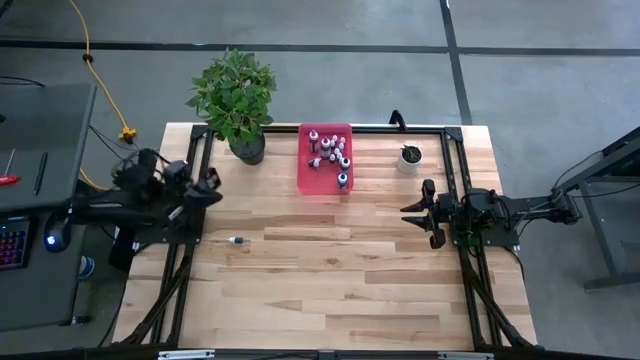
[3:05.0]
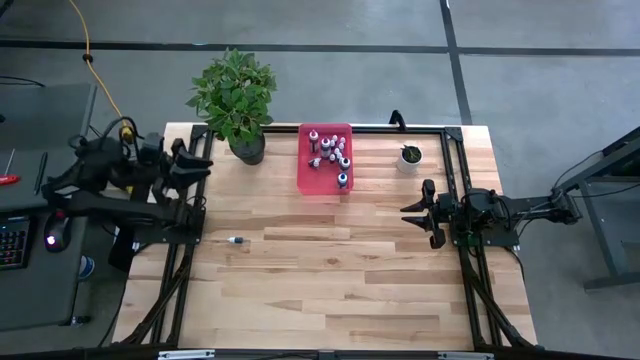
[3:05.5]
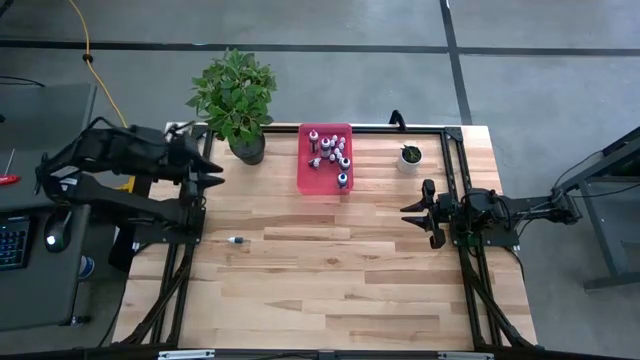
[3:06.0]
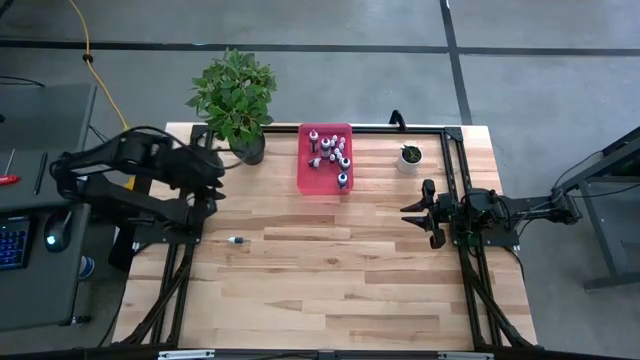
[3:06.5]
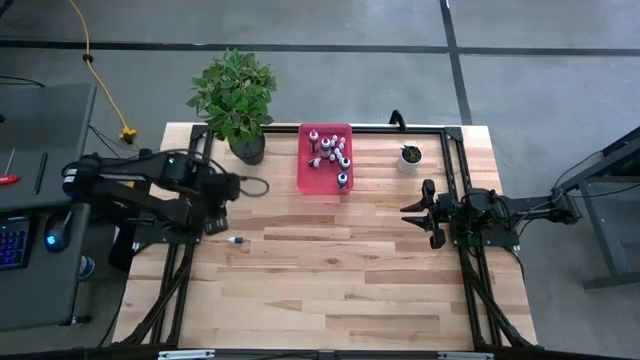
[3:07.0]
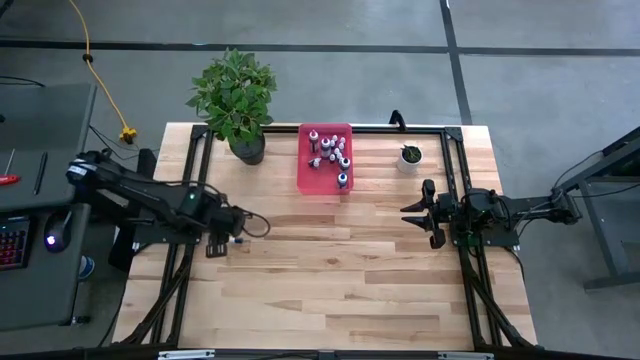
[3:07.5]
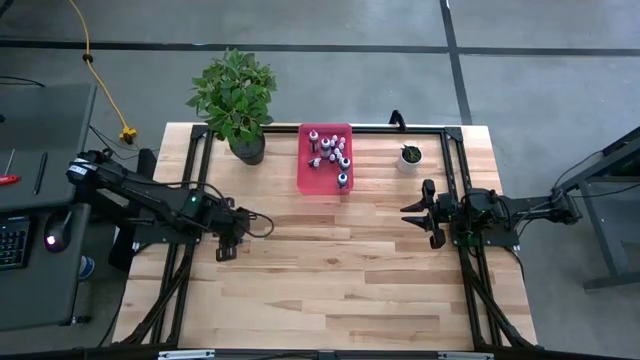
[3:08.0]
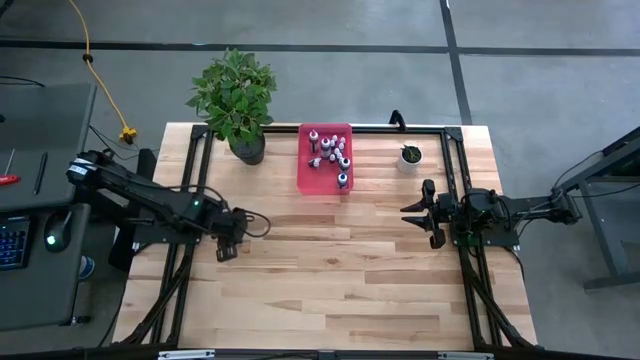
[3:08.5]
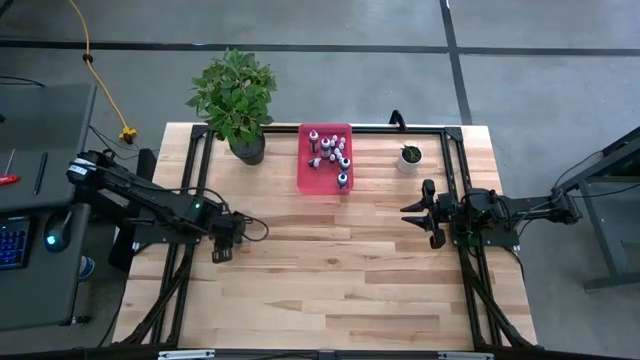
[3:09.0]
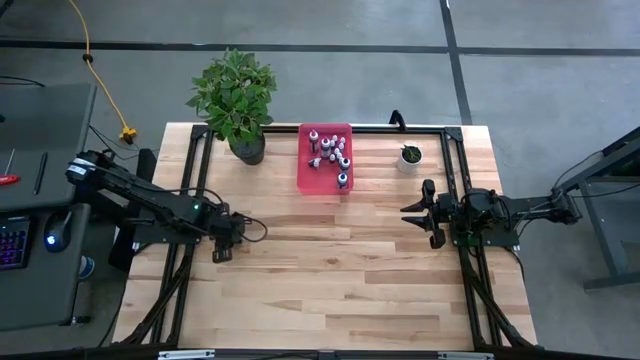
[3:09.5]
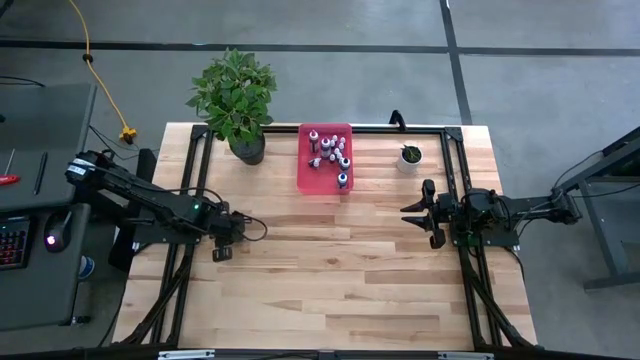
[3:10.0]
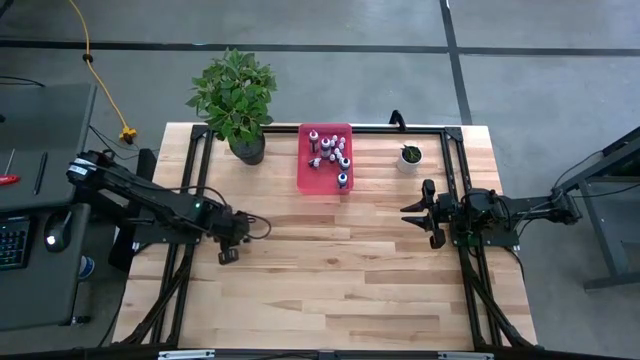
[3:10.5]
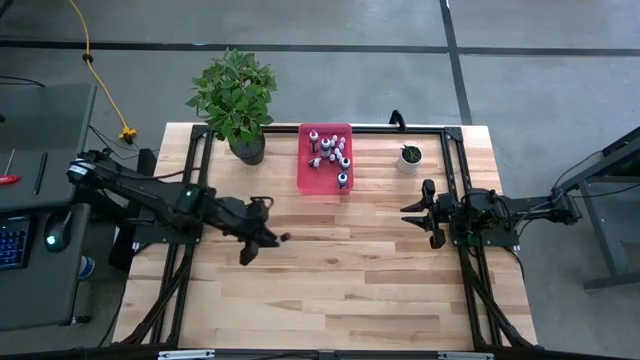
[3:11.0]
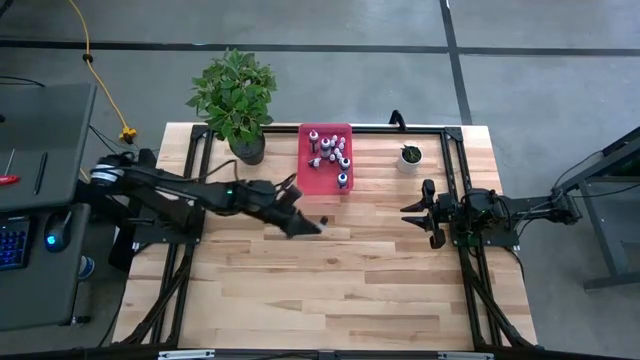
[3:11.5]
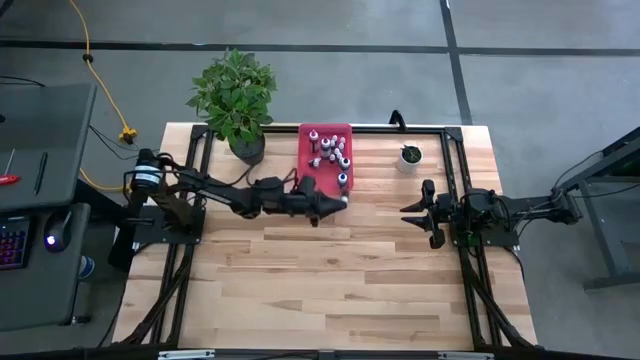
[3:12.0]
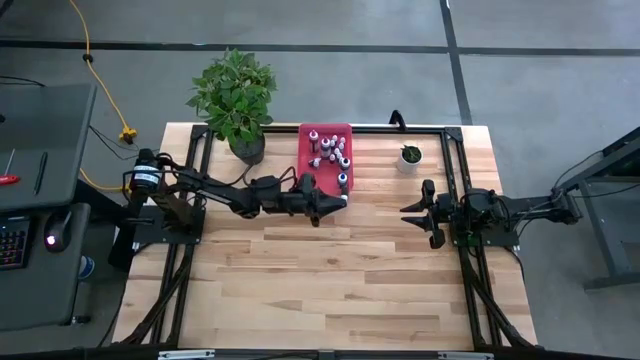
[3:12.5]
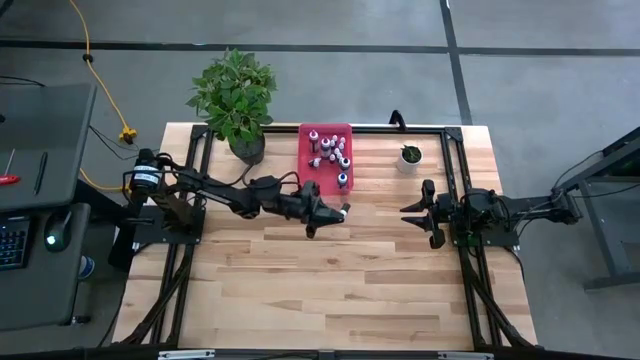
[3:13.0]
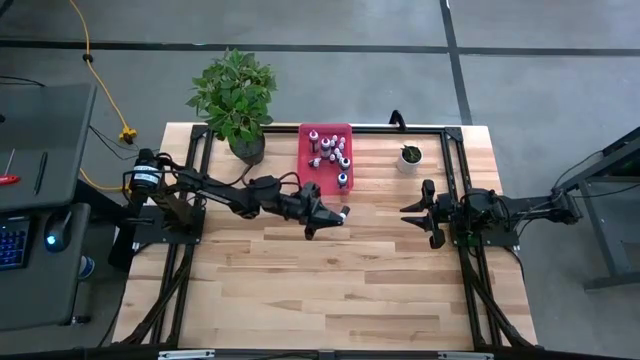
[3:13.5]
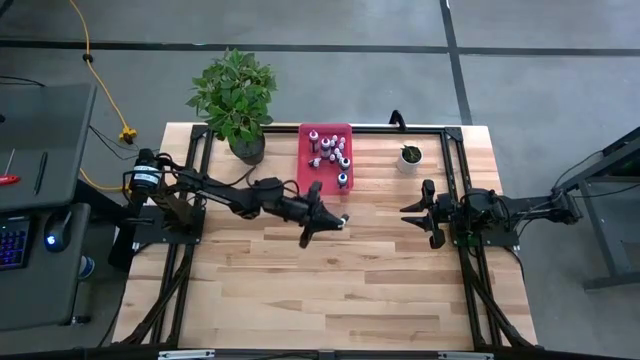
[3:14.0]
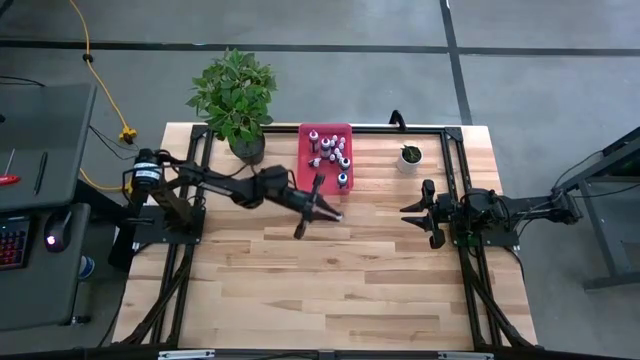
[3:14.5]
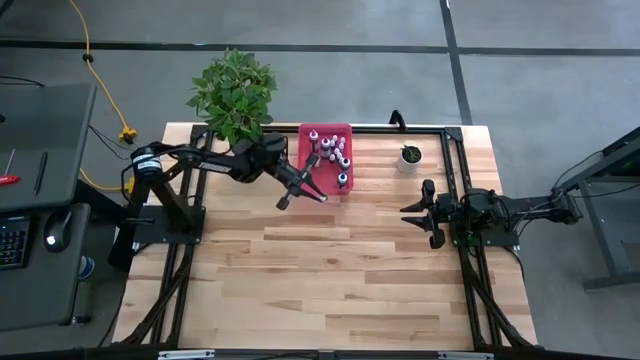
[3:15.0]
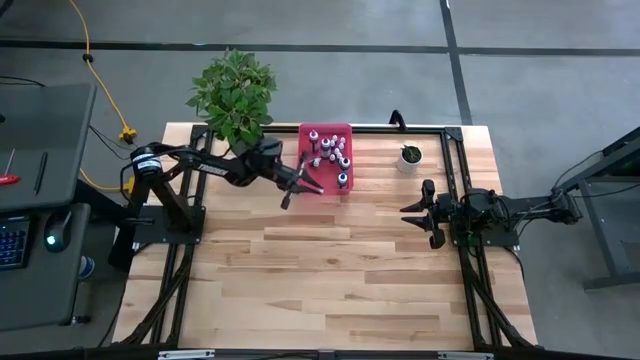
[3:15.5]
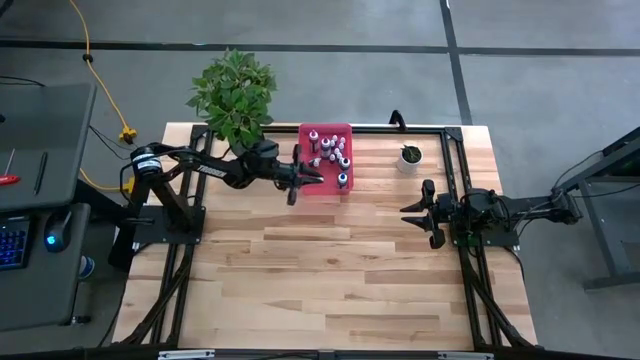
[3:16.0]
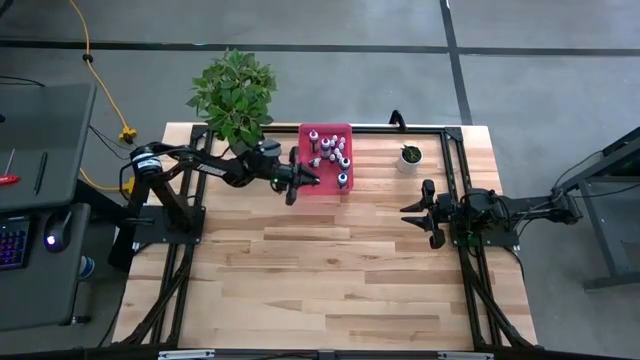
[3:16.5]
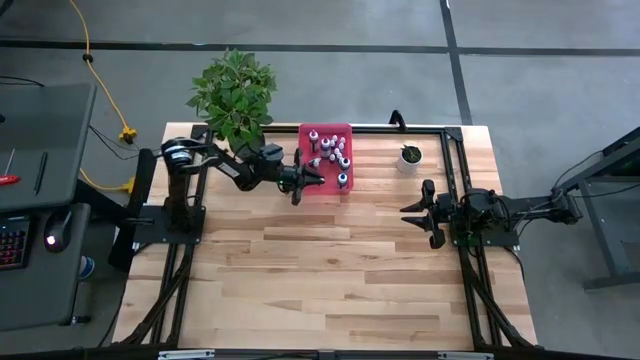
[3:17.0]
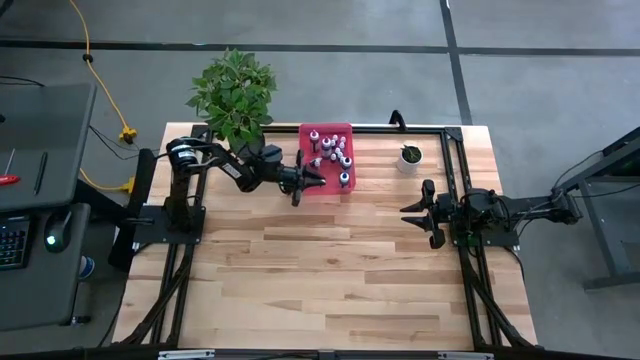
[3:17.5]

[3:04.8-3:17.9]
Task: Pick & Place food coloring
Put the black food coloring bottle into the pink bin

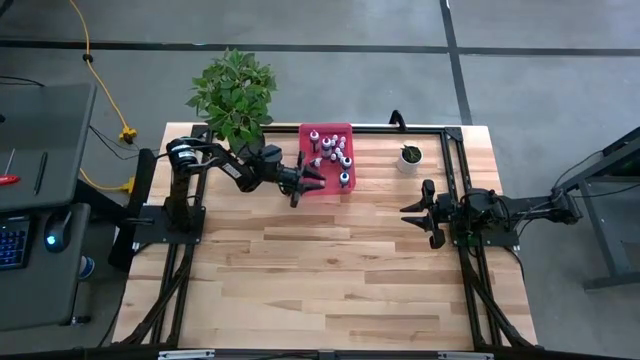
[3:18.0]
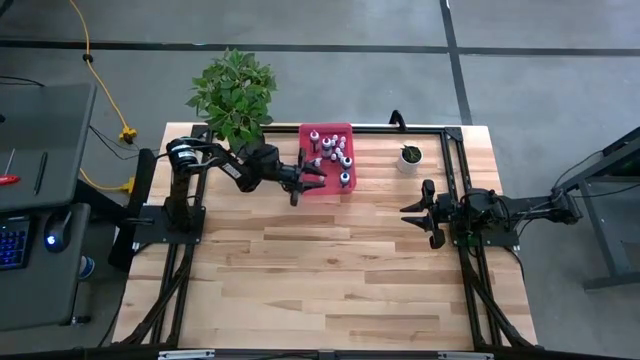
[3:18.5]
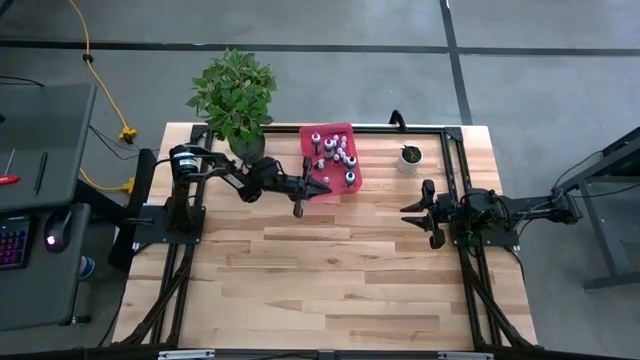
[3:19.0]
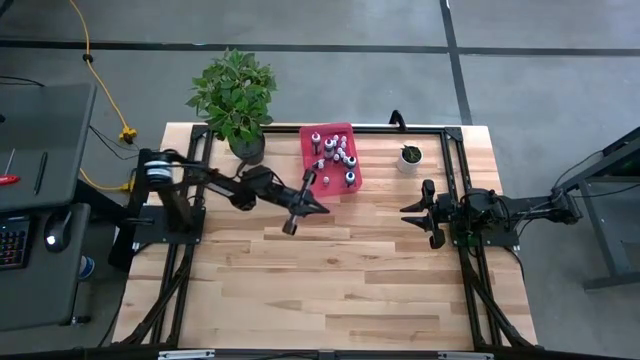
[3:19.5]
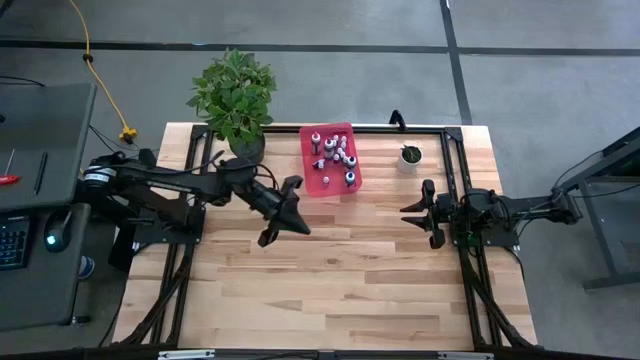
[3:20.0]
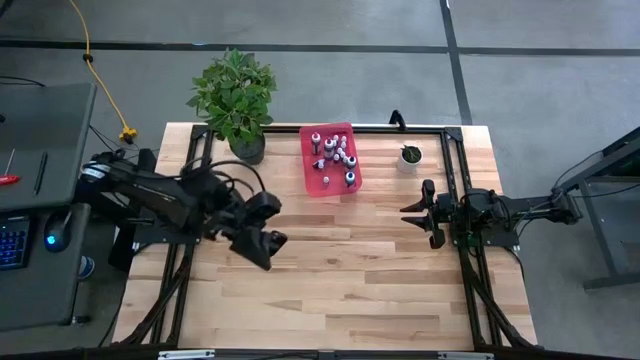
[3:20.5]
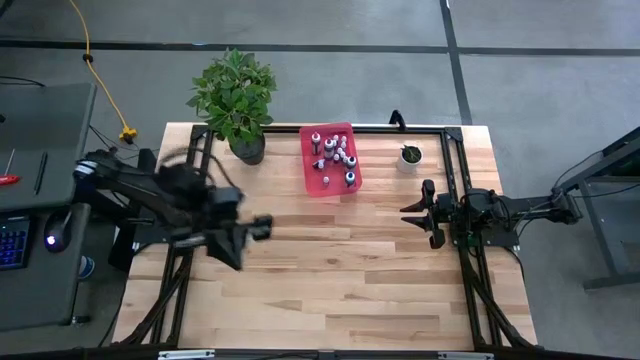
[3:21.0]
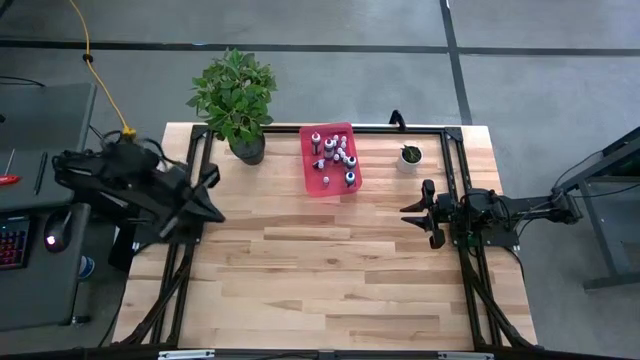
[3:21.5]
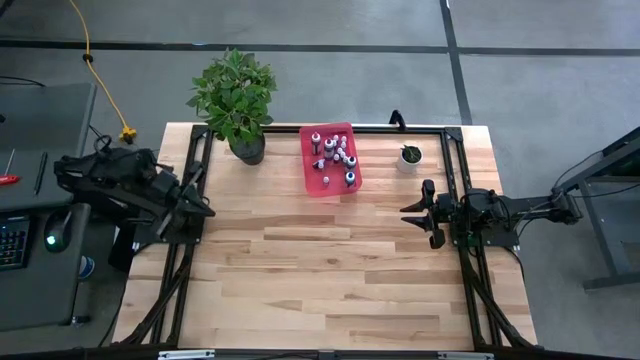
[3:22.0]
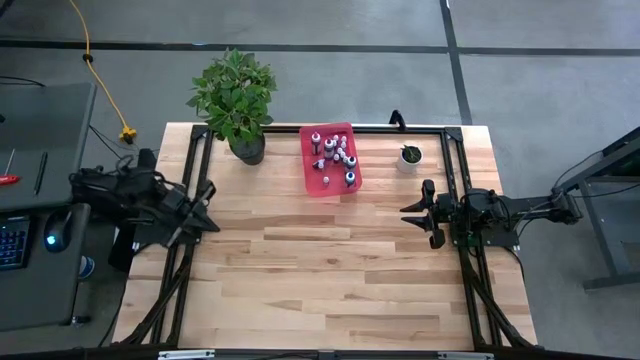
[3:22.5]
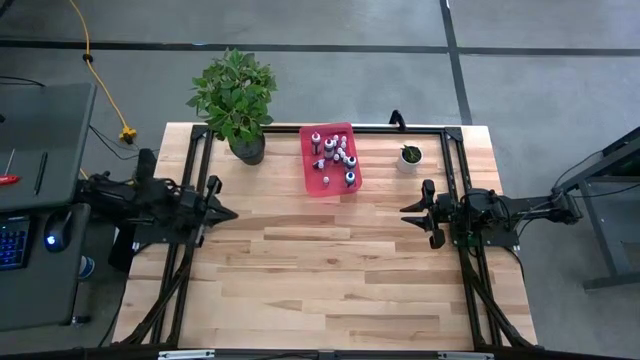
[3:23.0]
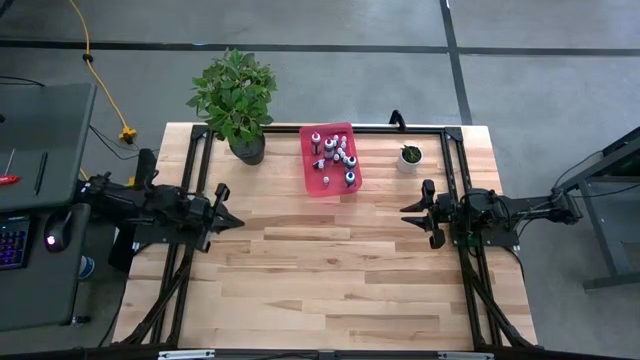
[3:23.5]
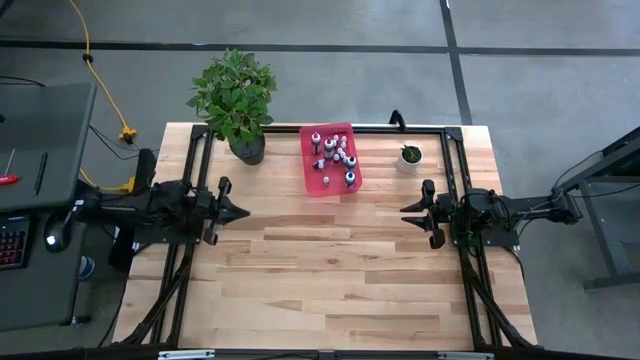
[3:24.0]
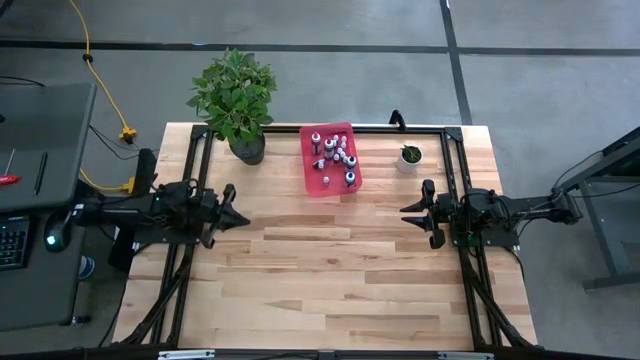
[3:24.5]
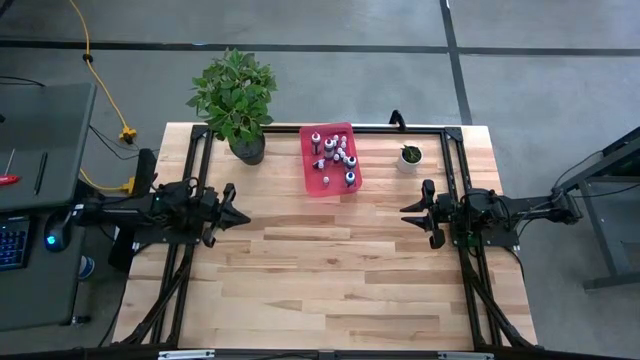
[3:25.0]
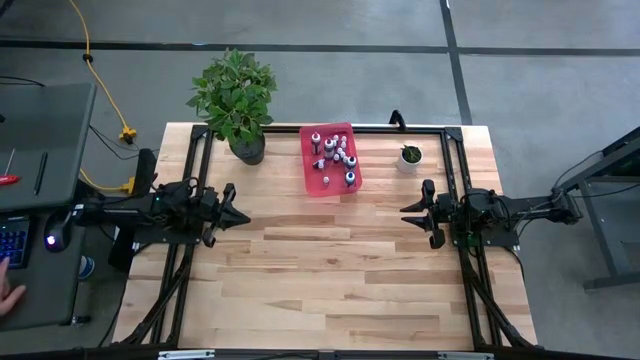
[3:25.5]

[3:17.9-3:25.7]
Return to Home Position
